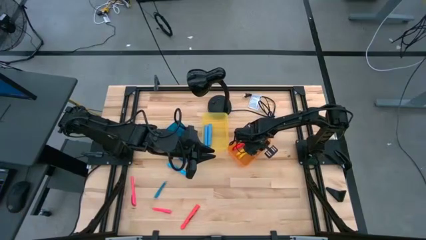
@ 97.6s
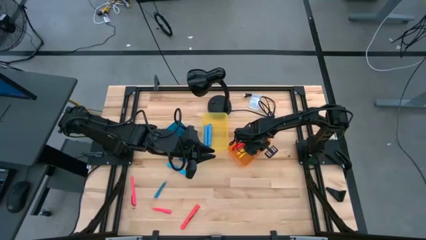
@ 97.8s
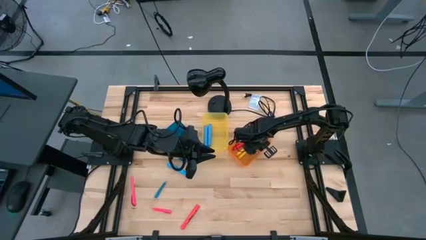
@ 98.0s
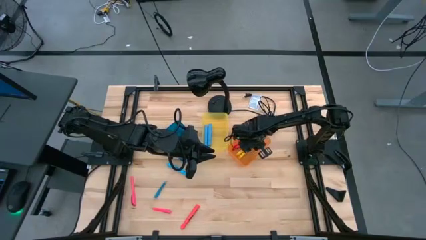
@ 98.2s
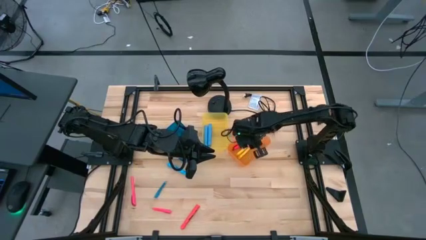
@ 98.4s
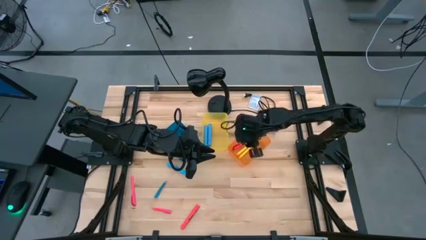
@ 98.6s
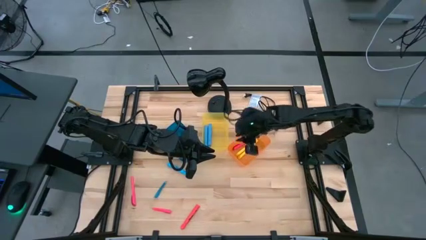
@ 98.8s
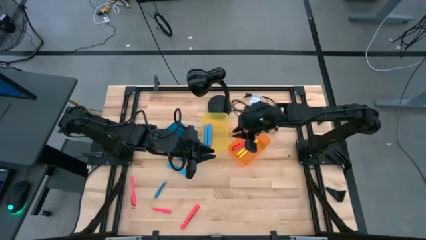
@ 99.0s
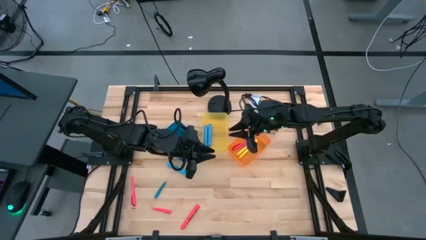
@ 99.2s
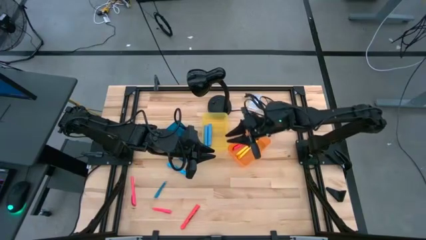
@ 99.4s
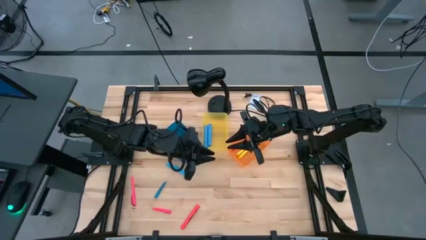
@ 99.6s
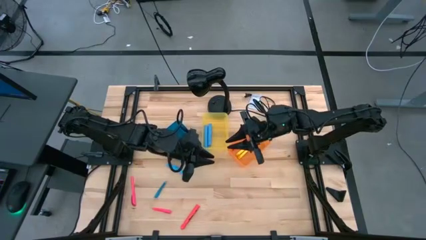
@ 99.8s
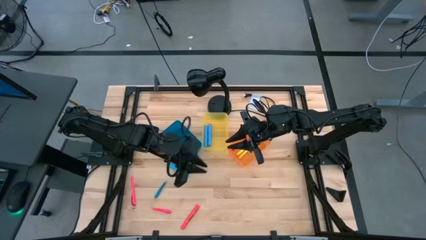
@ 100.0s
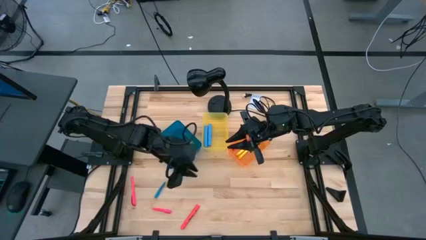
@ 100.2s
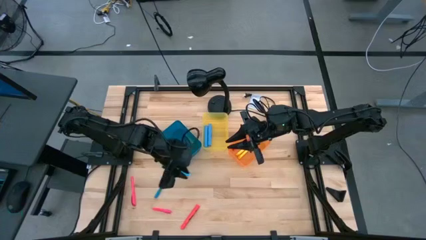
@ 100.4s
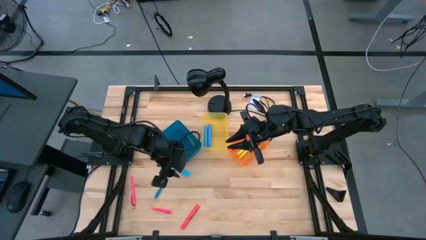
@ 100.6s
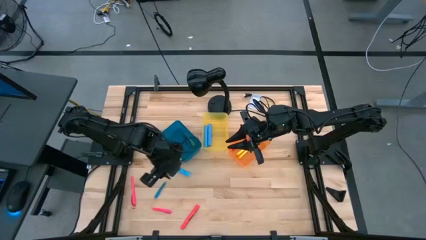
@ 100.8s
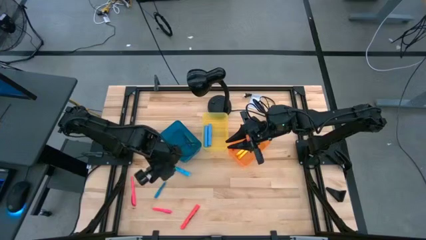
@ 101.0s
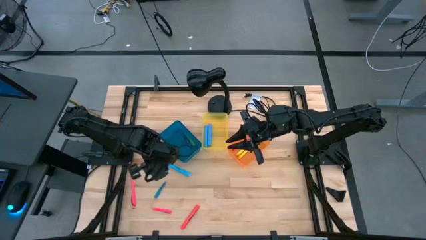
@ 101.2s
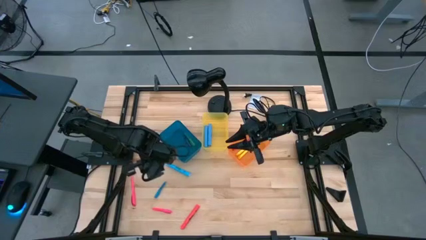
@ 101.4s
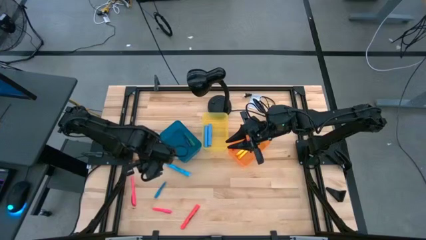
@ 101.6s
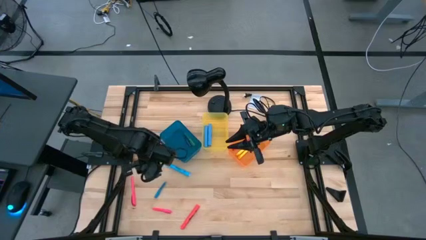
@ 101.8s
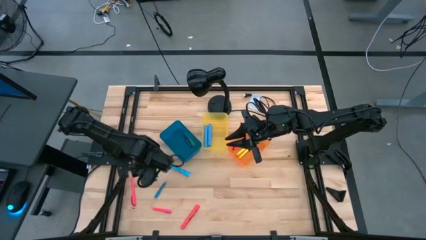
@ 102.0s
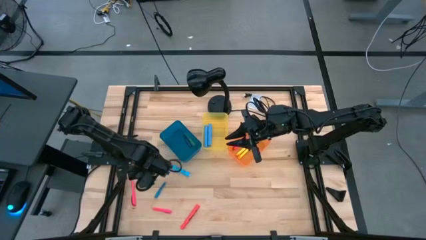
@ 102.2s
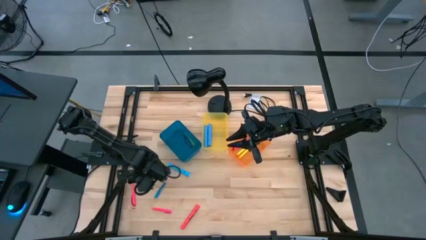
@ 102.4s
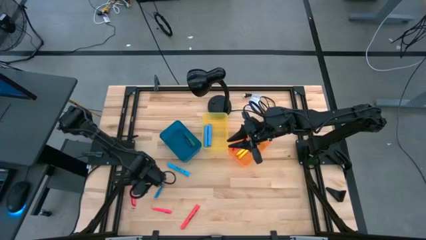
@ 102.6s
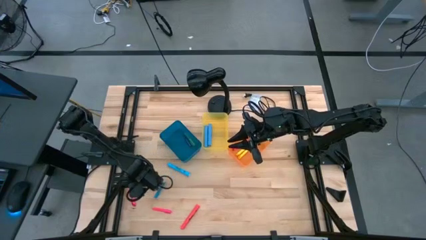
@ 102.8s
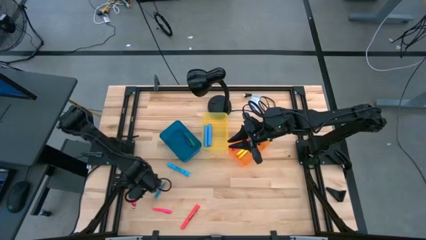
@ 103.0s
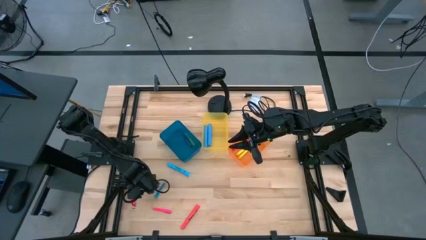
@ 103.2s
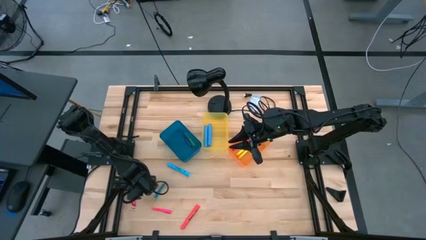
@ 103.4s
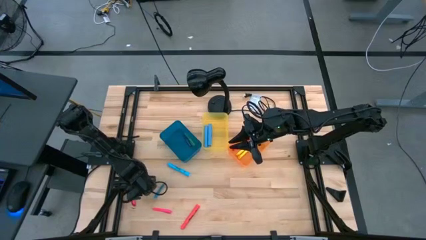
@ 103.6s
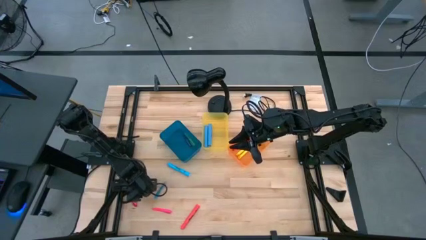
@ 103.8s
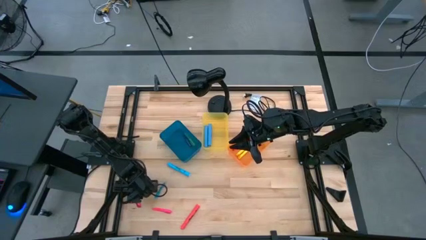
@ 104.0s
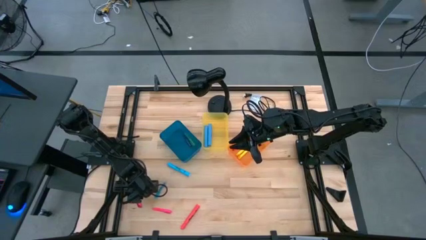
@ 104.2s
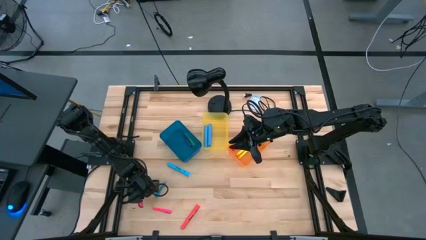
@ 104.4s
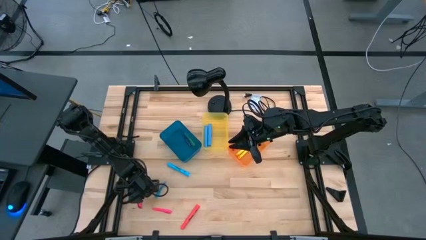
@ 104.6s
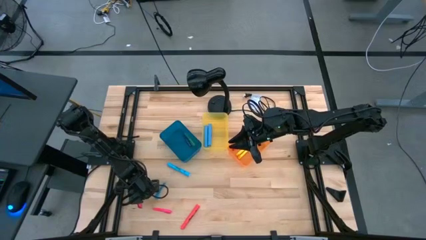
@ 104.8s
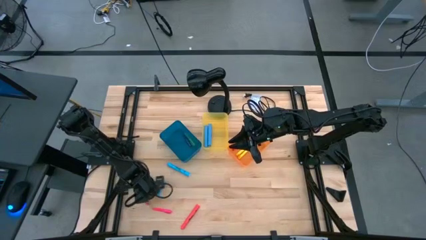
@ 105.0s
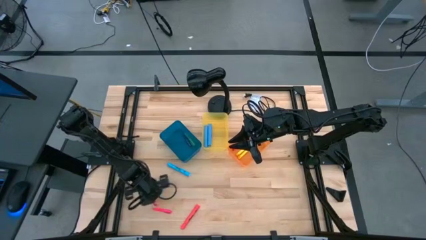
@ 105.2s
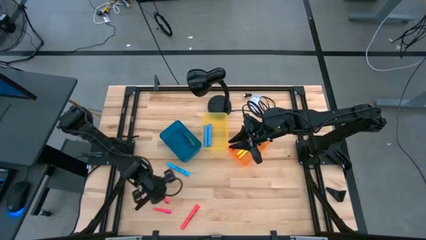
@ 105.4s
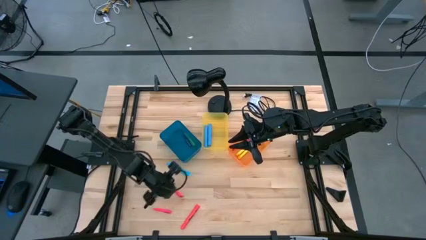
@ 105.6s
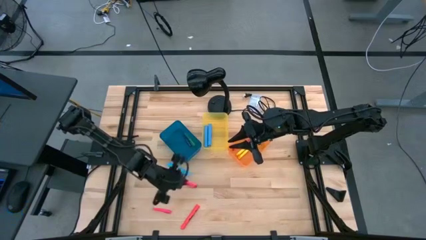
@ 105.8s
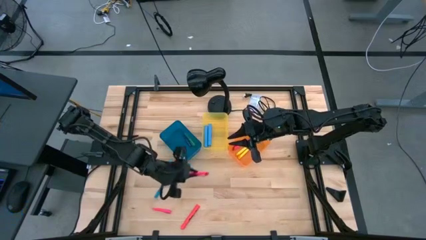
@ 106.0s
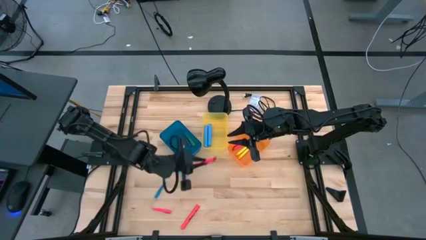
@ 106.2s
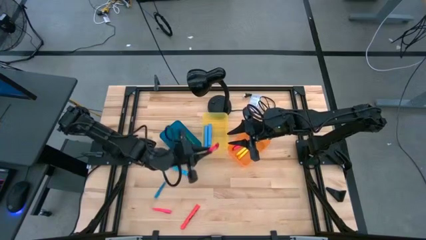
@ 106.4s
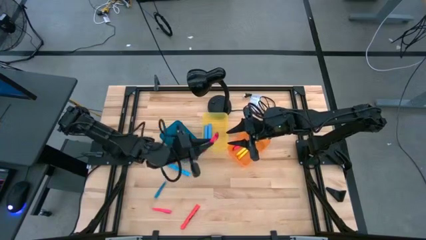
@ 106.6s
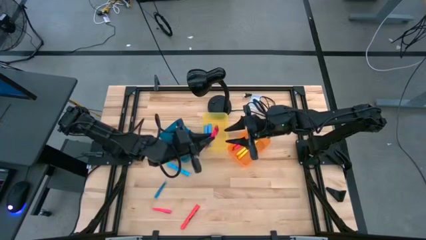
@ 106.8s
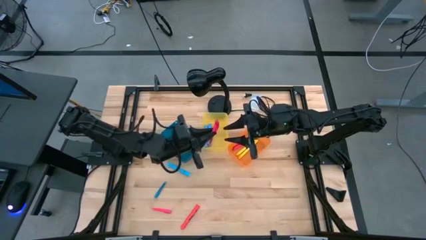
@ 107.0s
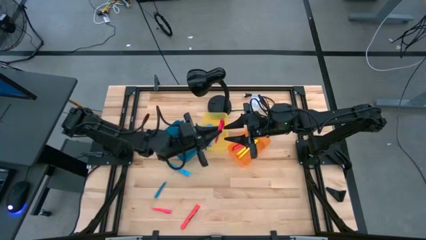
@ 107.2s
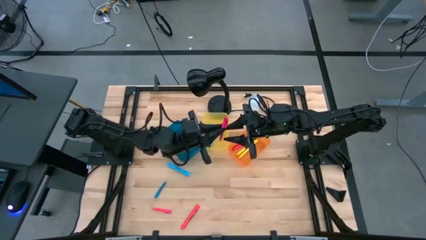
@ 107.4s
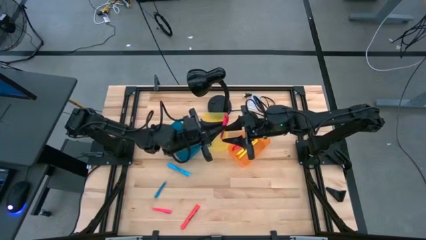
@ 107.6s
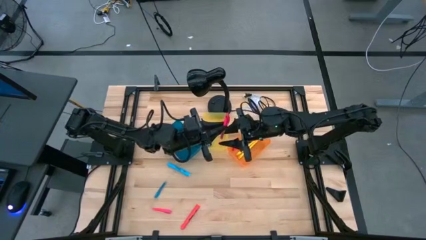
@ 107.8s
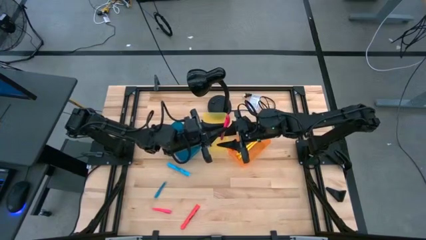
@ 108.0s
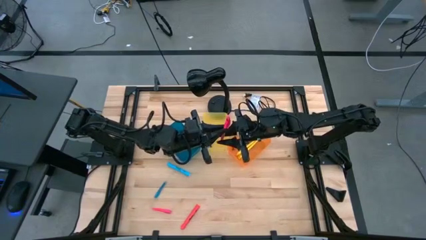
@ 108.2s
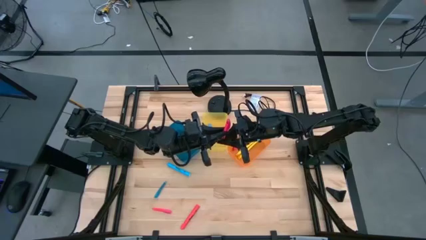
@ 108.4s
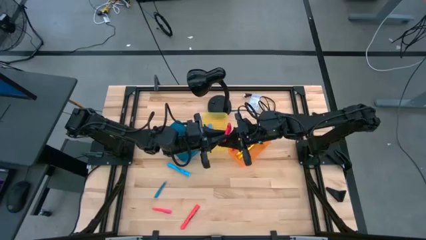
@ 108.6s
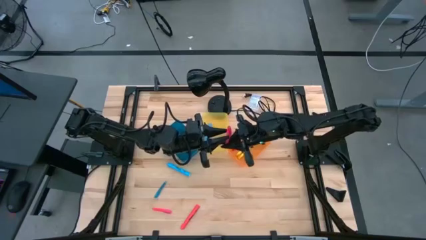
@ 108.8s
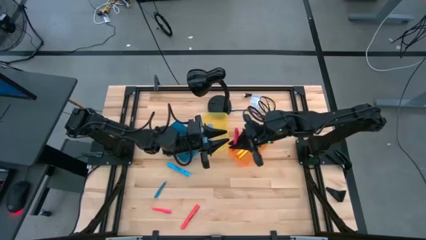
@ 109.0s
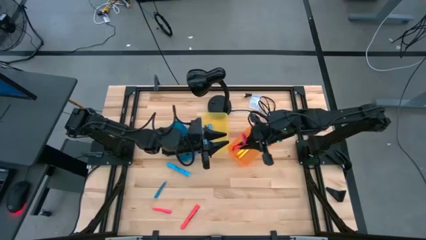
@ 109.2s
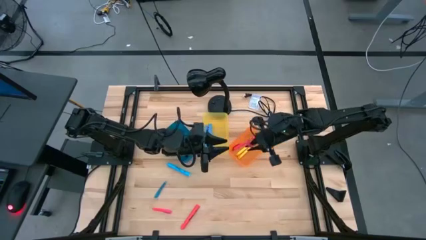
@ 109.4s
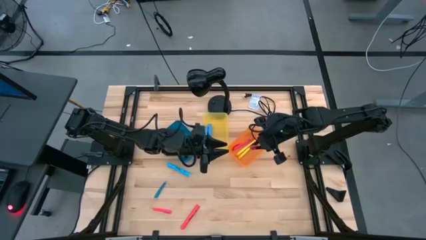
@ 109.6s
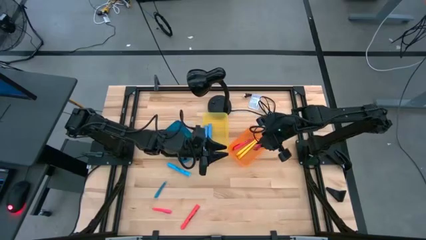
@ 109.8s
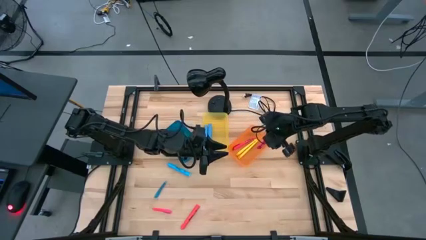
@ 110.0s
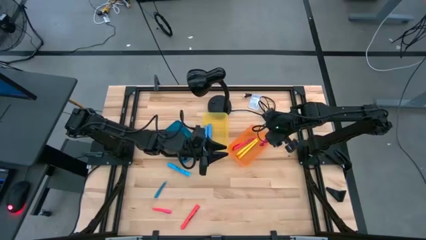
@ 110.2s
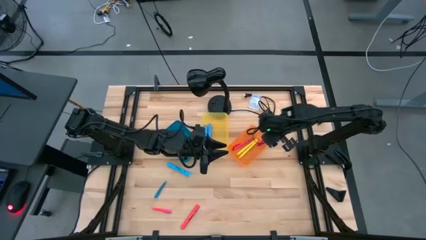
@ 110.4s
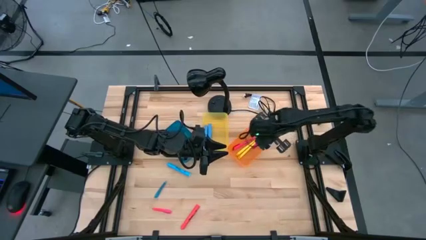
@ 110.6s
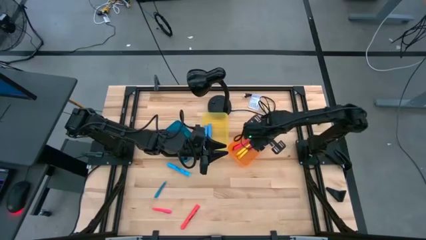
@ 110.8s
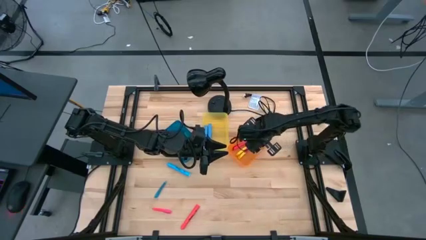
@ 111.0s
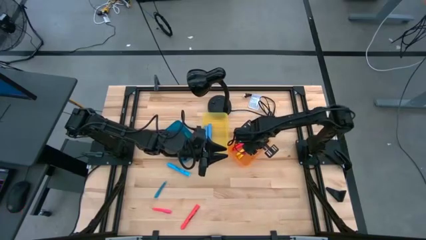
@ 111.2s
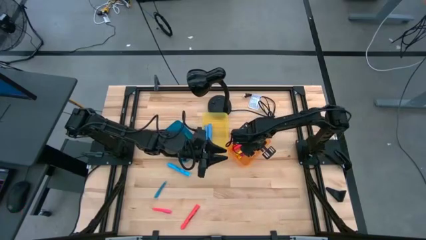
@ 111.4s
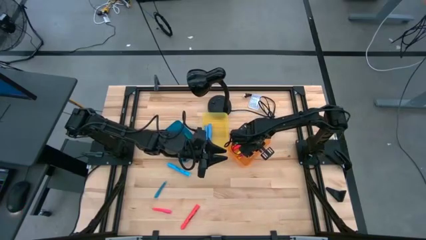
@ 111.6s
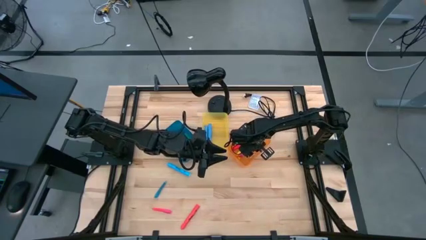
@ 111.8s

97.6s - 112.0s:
Task: Pick & Place Markers
Put the pink pen into the orange bin
